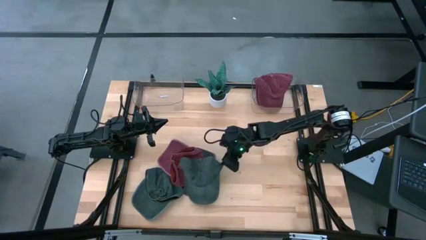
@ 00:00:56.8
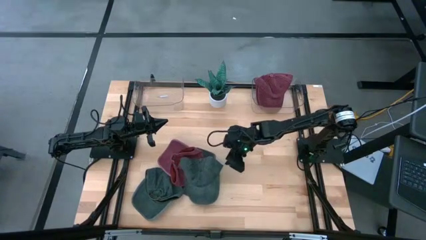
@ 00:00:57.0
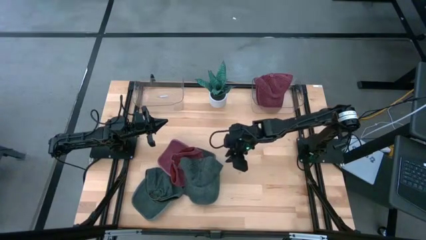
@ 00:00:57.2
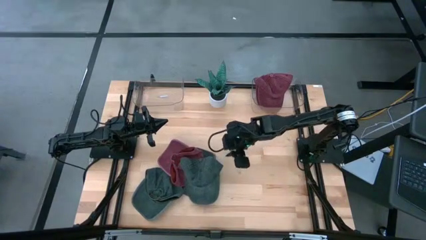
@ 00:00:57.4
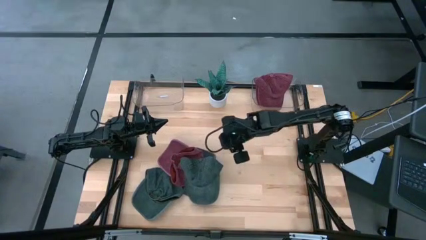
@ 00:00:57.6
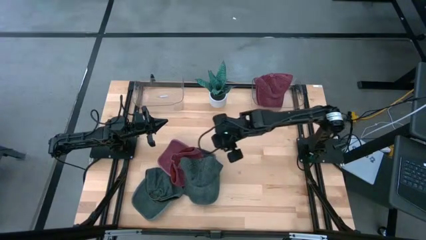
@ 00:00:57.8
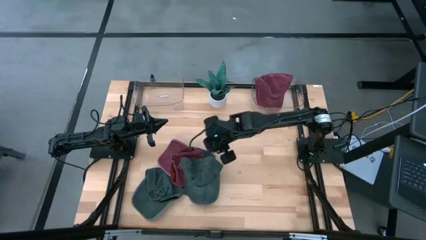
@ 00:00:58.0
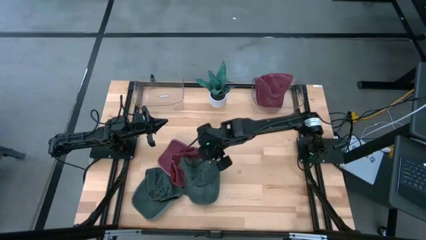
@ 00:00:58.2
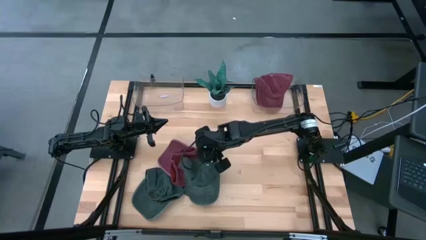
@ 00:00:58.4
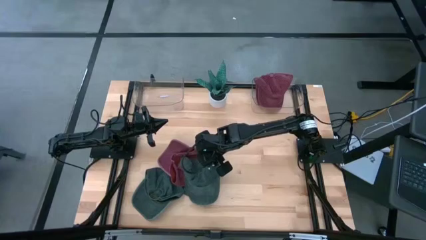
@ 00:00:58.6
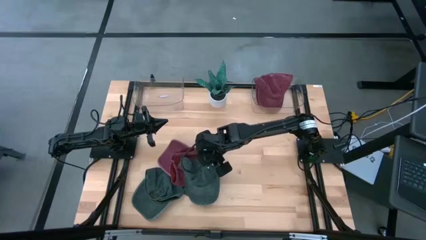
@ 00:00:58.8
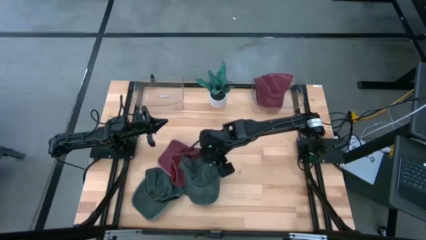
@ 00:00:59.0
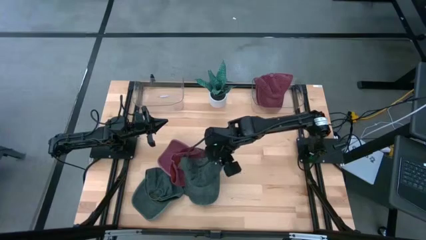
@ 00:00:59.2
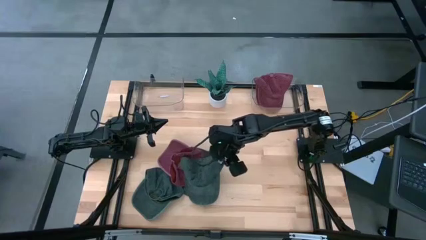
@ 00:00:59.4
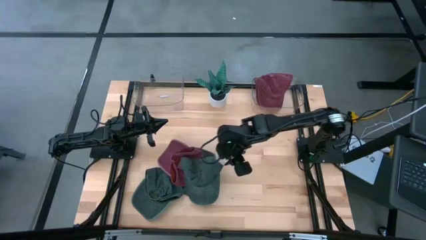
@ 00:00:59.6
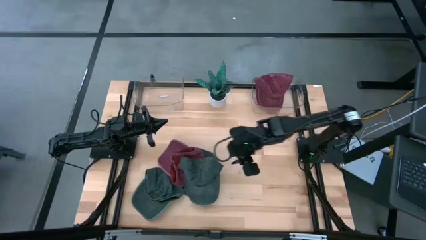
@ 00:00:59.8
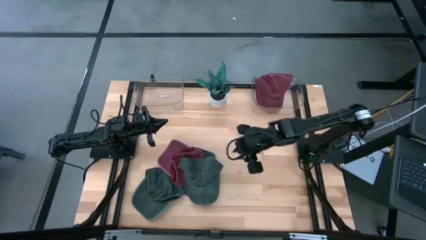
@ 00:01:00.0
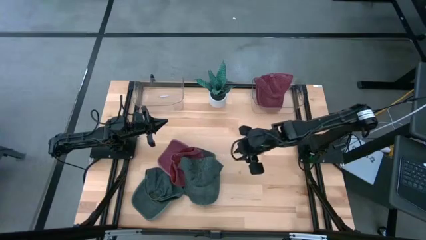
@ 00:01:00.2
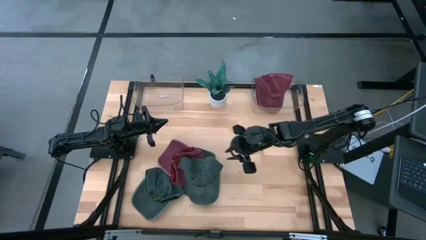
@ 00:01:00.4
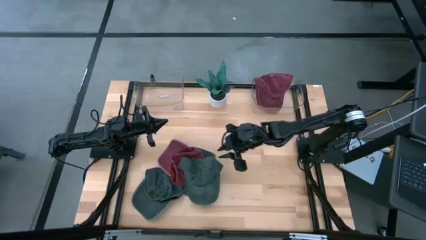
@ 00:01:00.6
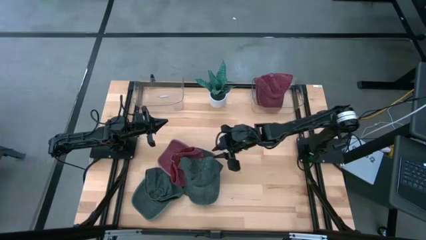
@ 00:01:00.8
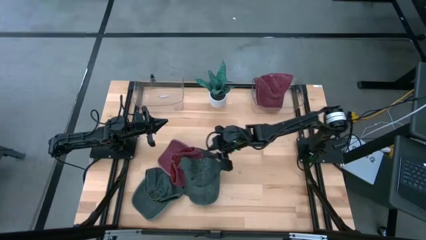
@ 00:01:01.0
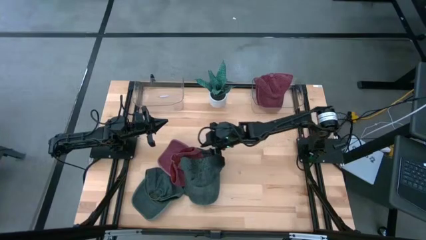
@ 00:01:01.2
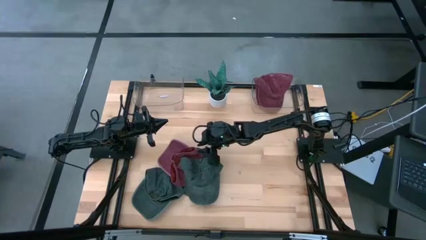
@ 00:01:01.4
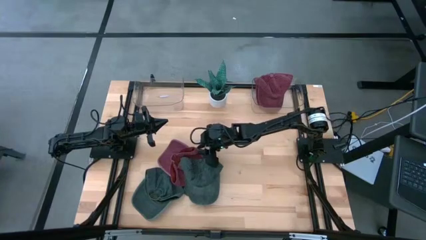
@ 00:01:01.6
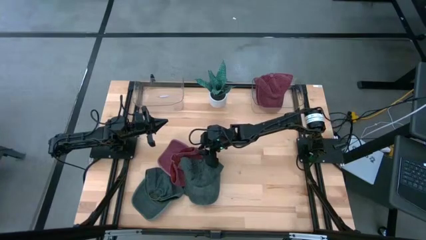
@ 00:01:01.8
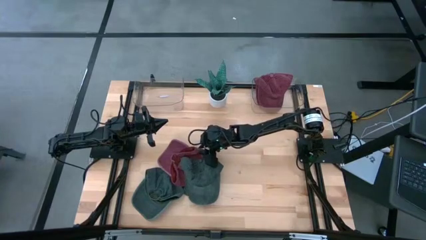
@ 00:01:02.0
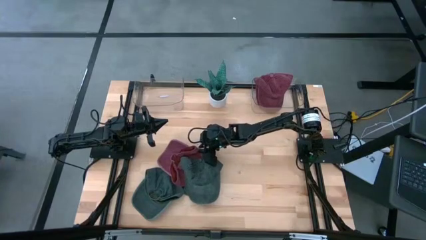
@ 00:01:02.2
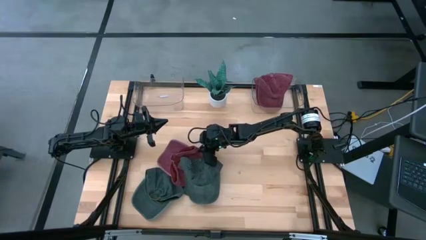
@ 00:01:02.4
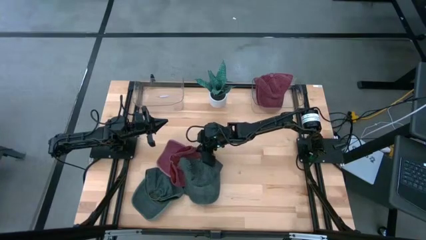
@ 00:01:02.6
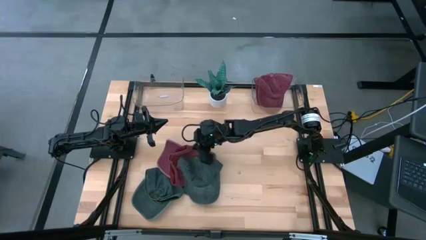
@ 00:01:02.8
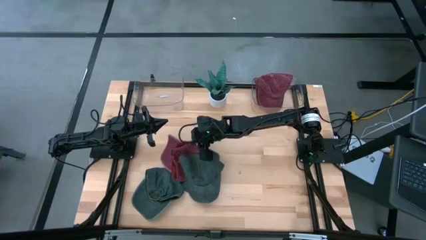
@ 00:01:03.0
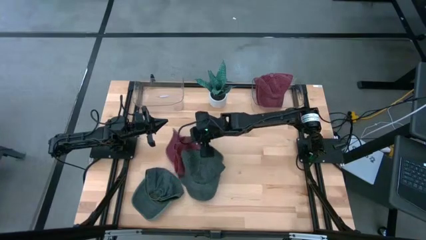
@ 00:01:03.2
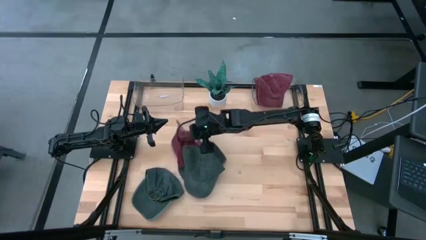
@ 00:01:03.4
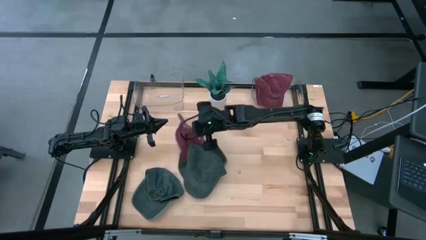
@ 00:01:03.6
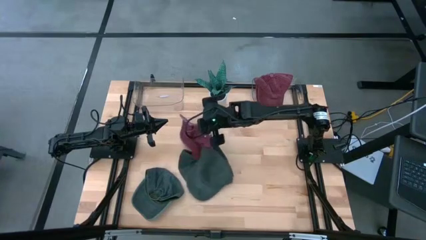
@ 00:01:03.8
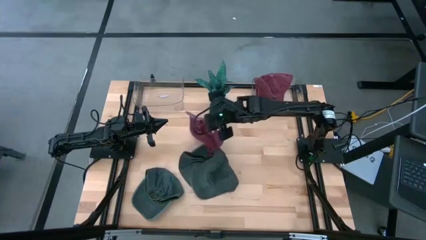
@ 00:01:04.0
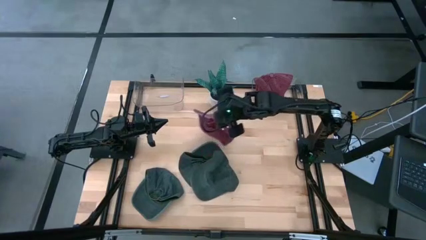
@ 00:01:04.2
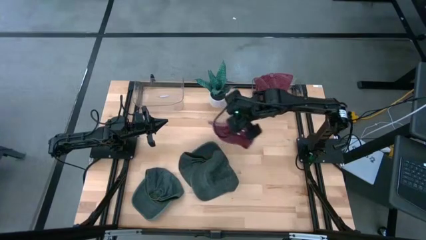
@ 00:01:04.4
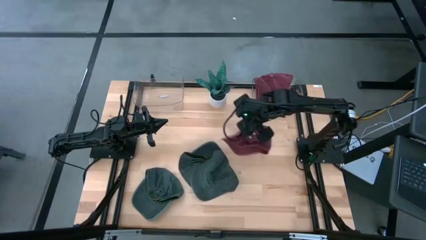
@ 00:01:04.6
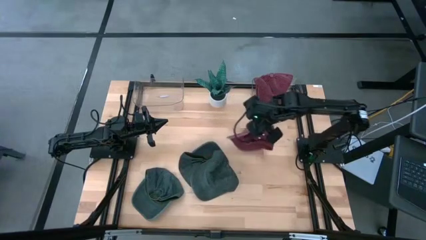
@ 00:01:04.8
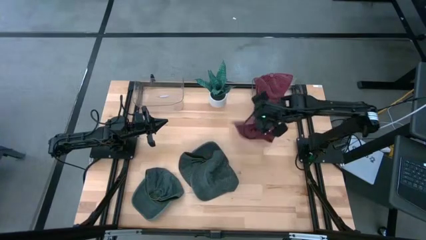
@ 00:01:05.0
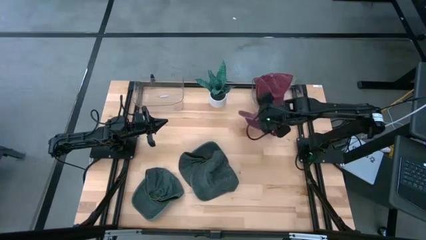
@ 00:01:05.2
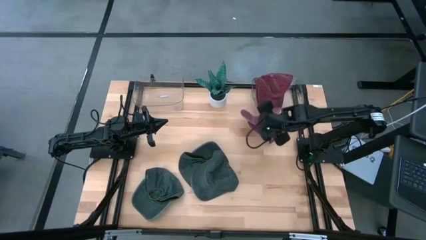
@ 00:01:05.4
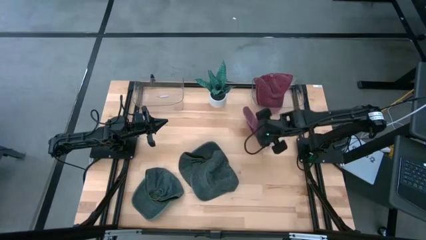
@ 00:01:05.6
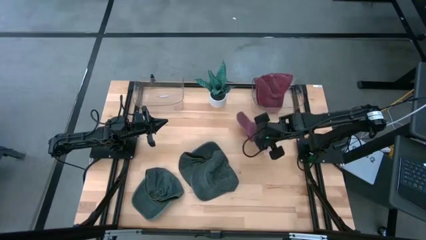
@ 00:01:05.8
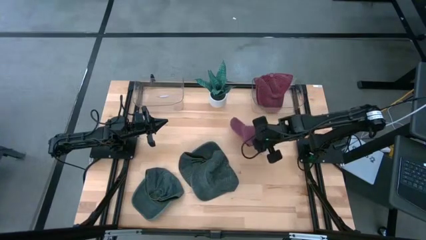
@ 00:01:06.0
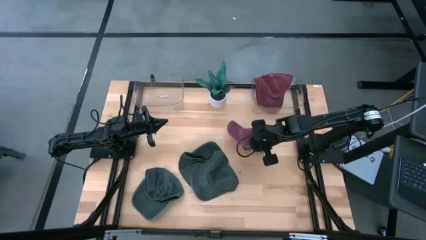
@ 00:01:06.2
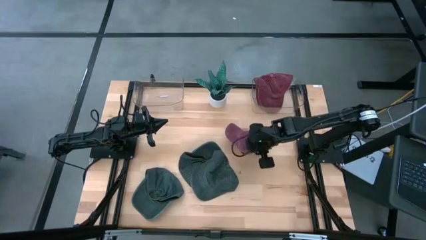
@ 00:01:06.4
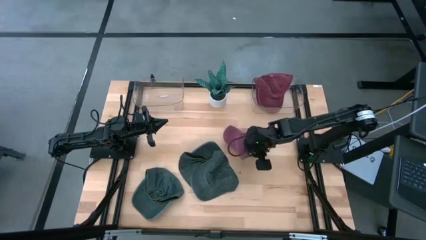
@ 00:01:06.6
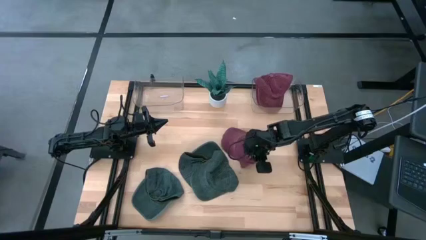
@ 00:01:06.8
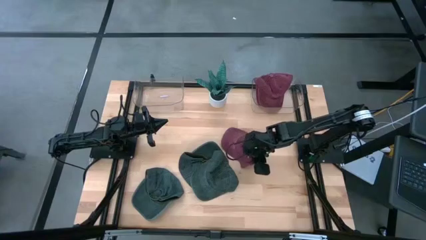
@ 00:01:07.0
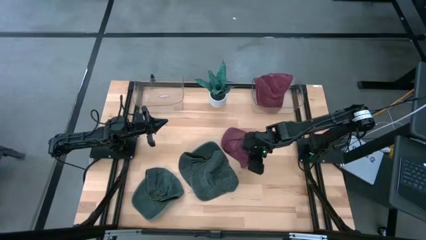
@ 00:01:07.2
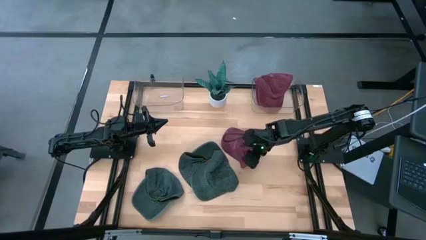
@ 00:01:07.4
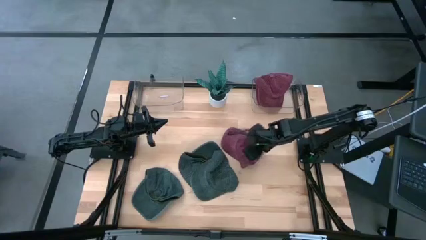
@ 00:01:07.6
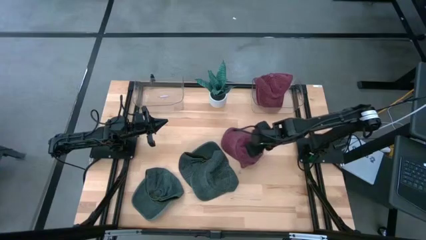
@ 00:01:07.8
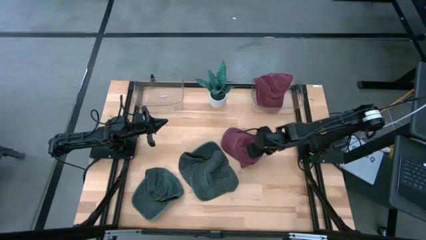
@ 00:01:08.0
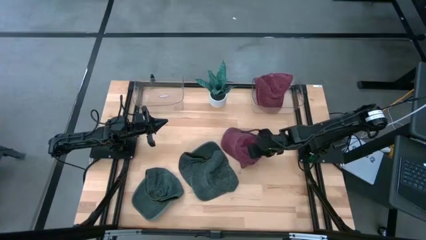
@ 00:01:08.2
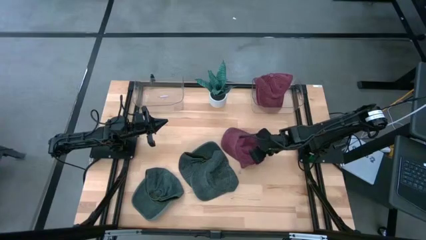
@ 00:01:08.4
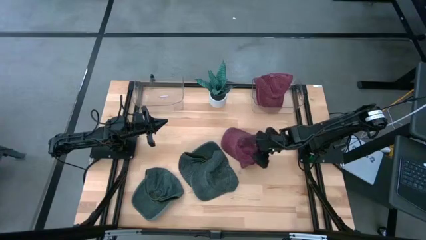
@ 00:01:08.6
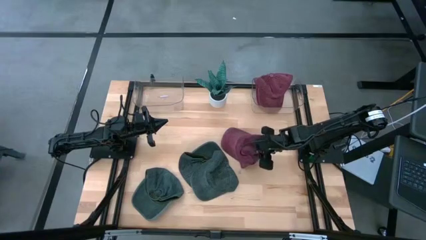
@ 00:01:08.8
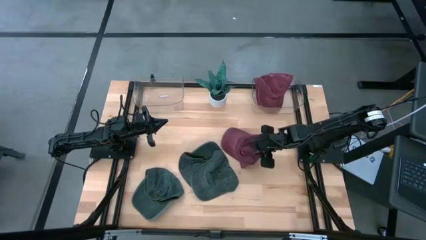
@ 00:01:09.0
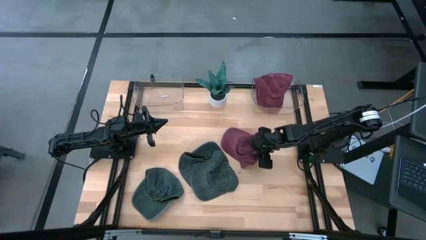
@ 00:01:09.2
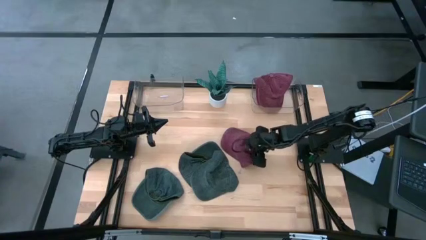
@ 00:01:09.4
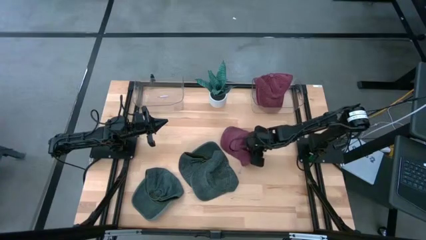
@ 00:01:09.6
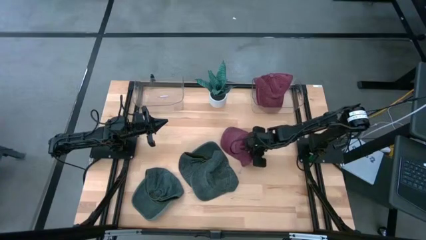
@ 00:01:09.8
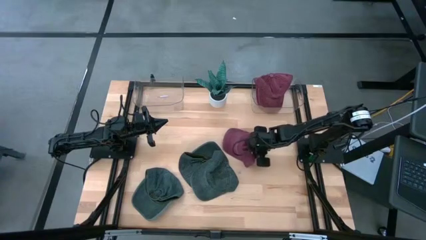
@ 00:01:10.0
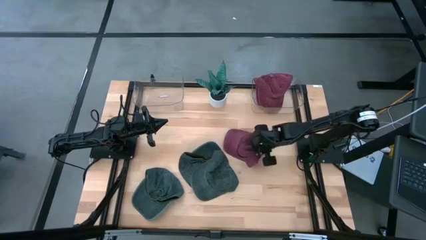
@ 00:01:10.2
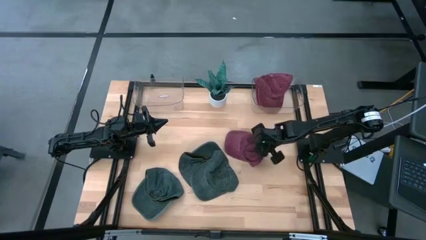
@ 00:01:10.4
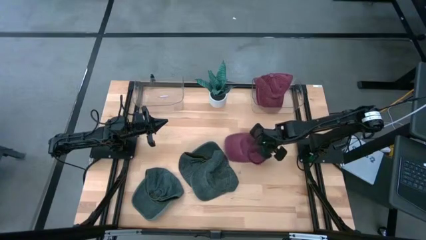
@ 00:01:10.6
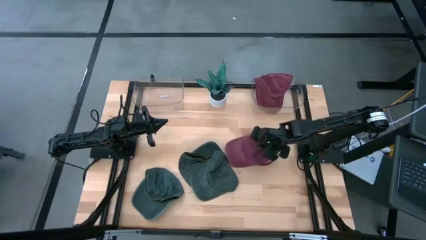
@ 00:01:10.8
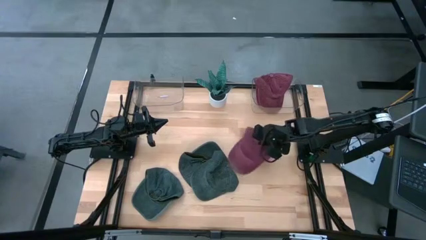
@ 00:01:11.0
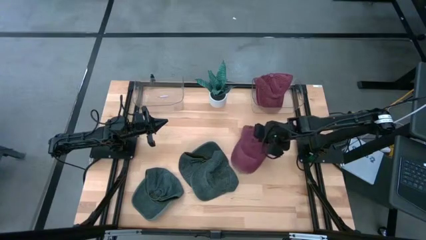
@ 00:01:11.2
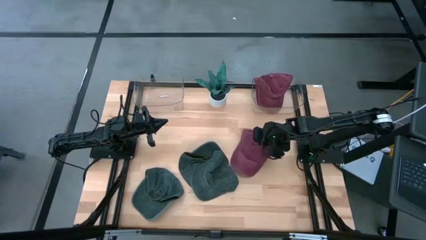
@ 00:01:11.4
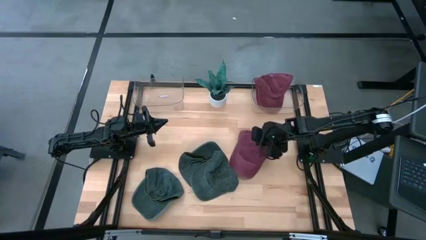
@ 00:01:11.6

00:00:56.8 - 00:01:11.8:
Task: Pick & Place hat
Put the red cap into the right transparent bin
